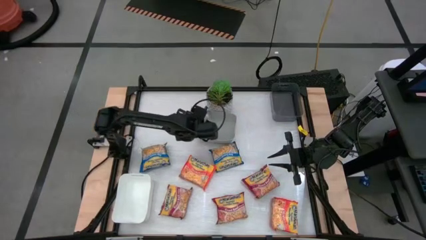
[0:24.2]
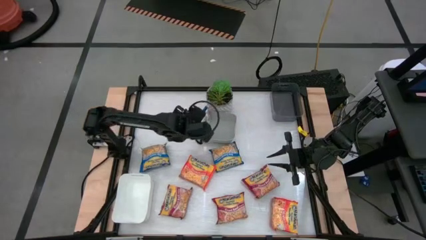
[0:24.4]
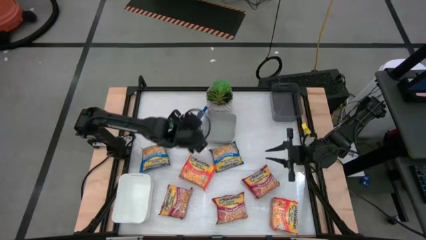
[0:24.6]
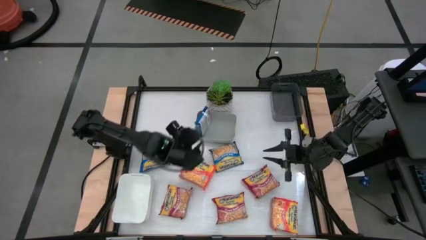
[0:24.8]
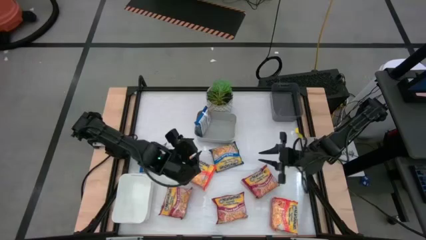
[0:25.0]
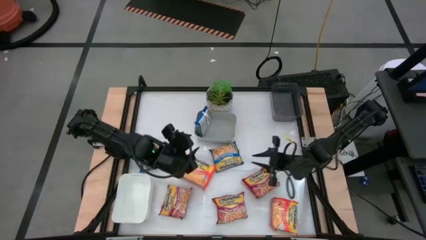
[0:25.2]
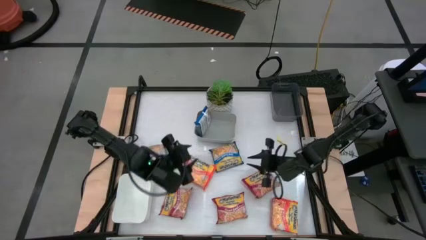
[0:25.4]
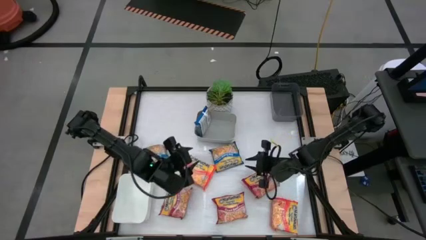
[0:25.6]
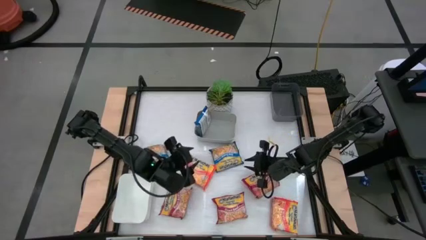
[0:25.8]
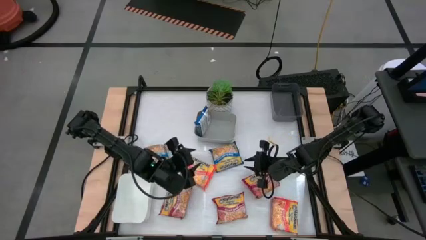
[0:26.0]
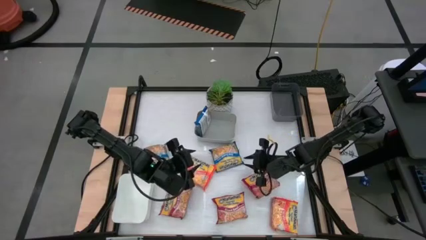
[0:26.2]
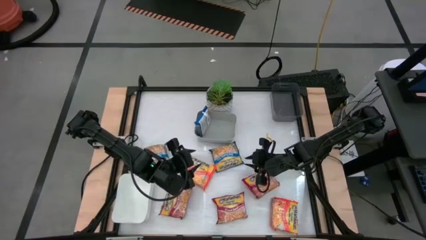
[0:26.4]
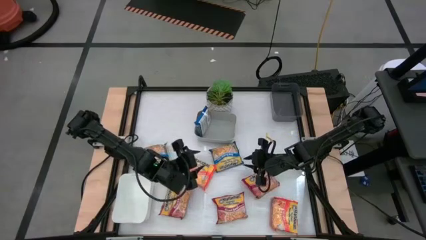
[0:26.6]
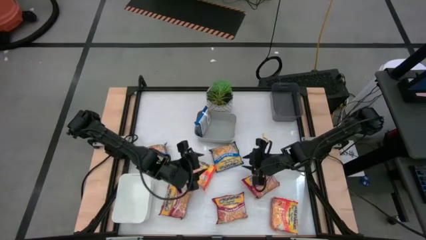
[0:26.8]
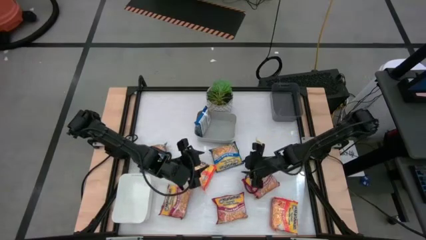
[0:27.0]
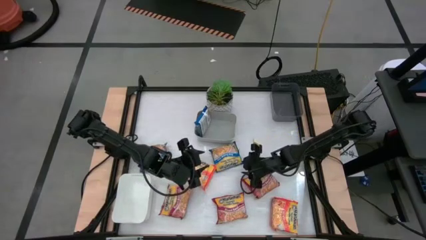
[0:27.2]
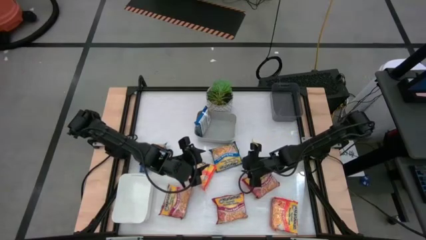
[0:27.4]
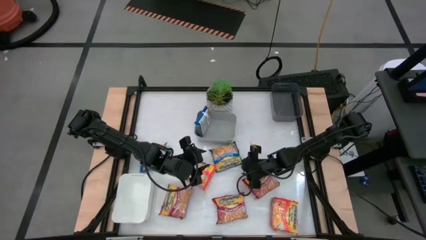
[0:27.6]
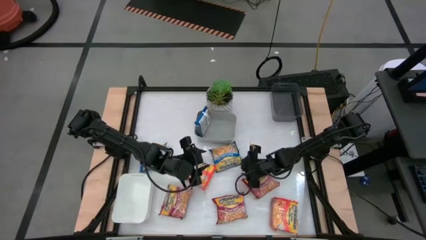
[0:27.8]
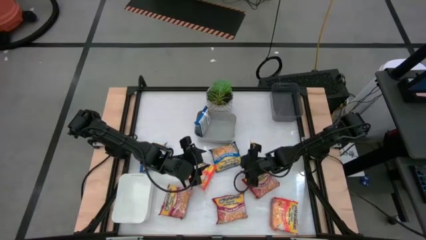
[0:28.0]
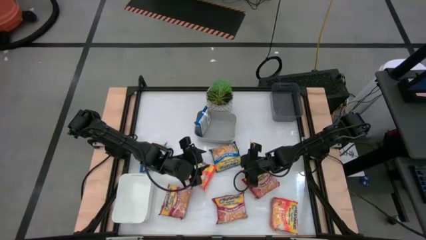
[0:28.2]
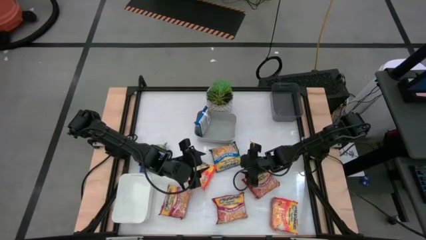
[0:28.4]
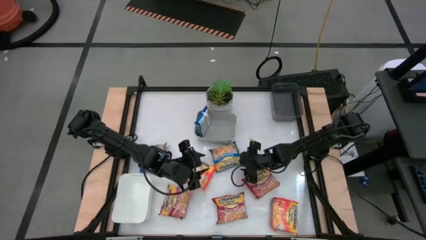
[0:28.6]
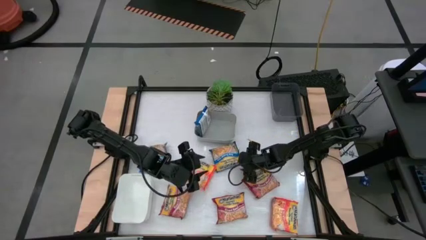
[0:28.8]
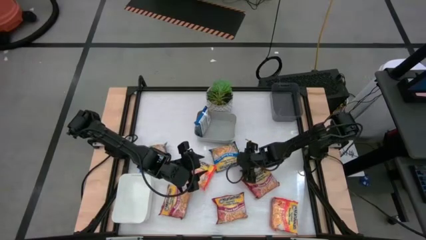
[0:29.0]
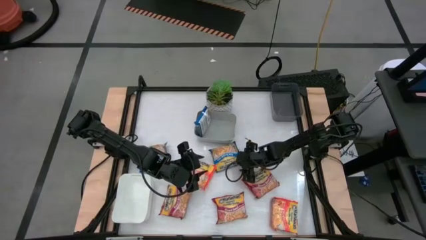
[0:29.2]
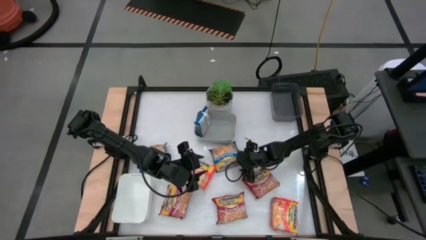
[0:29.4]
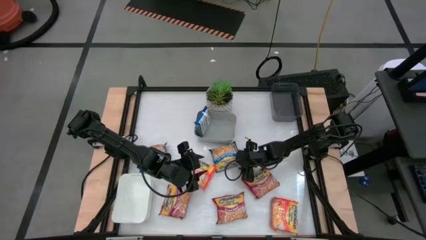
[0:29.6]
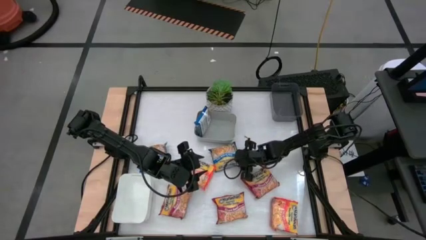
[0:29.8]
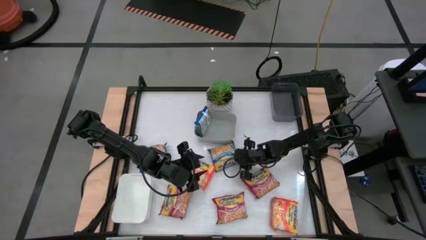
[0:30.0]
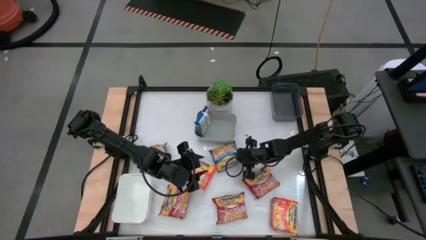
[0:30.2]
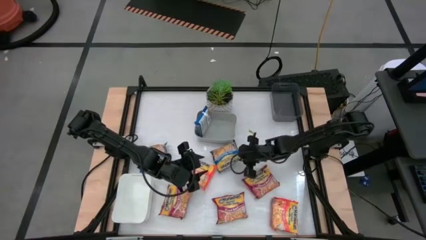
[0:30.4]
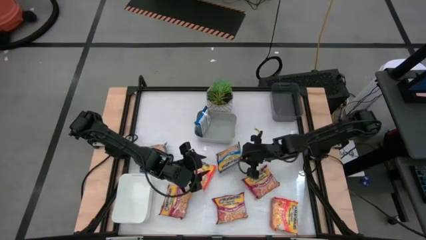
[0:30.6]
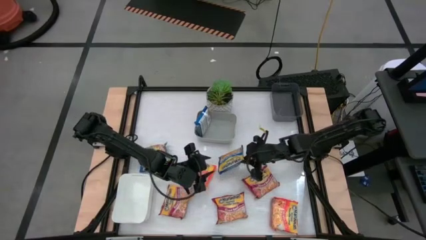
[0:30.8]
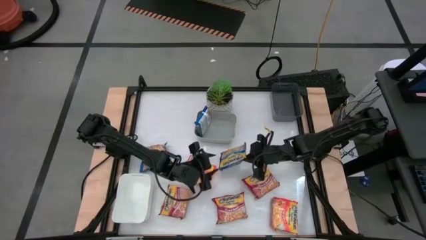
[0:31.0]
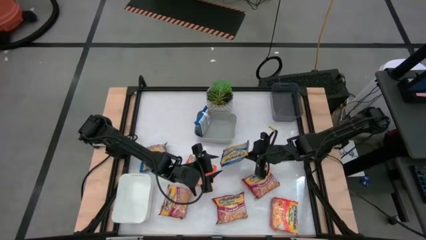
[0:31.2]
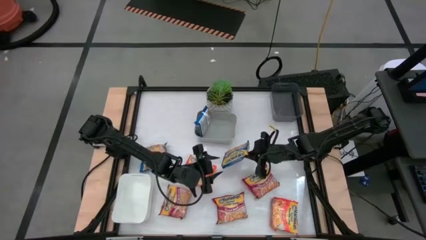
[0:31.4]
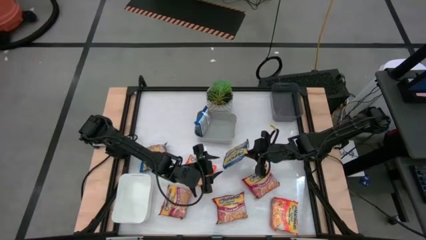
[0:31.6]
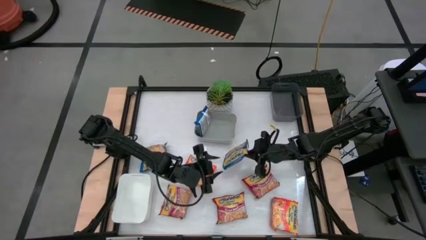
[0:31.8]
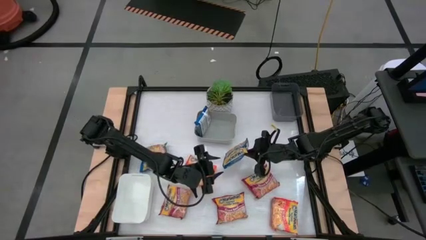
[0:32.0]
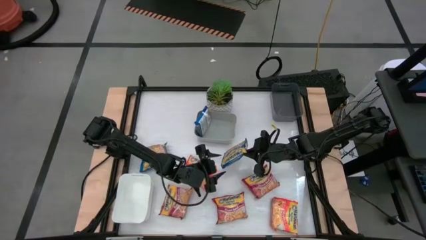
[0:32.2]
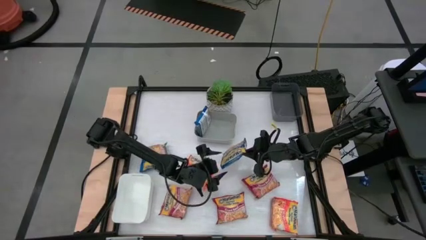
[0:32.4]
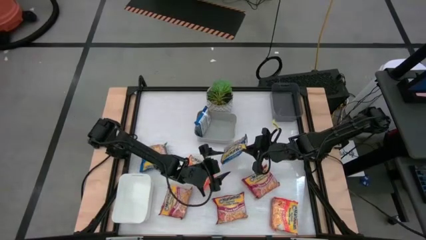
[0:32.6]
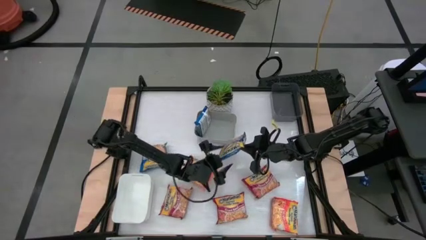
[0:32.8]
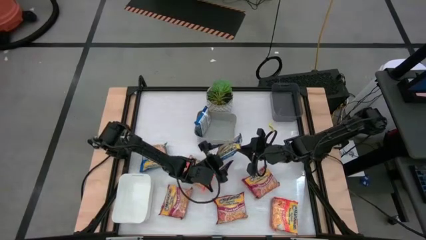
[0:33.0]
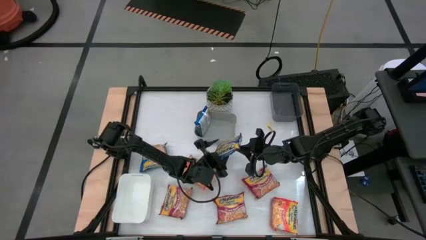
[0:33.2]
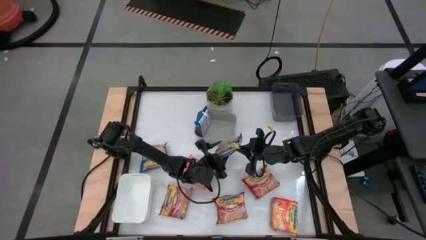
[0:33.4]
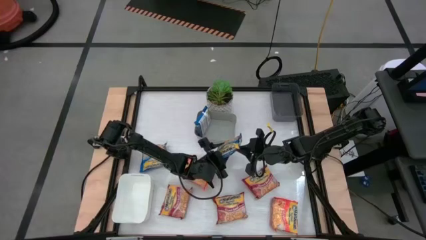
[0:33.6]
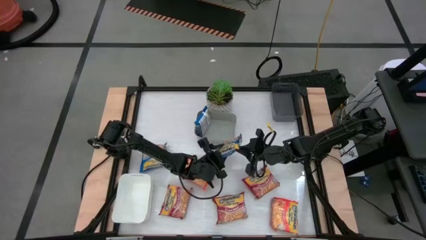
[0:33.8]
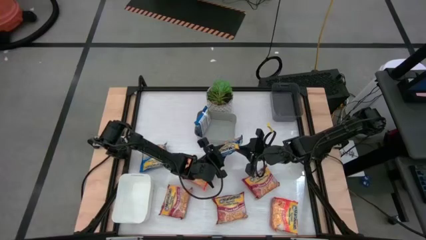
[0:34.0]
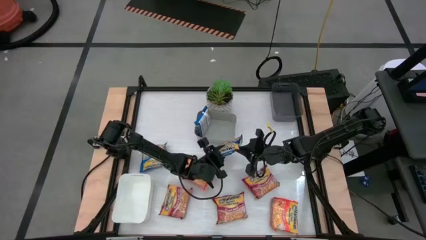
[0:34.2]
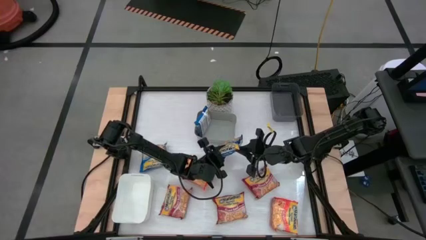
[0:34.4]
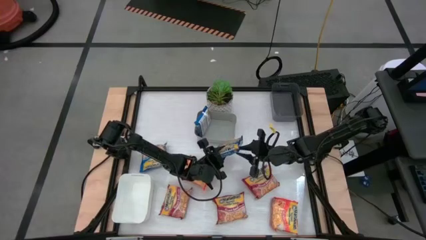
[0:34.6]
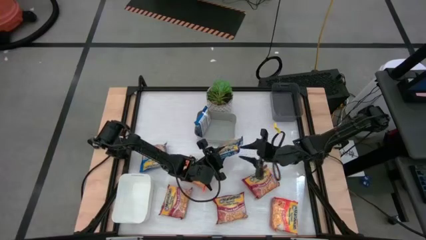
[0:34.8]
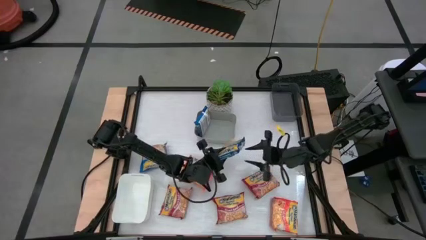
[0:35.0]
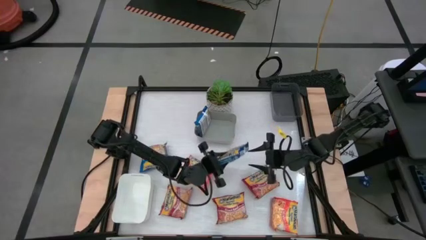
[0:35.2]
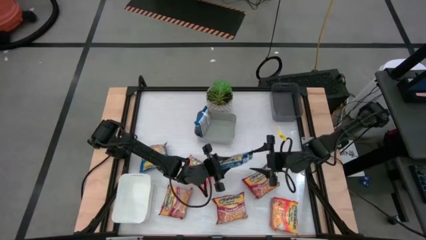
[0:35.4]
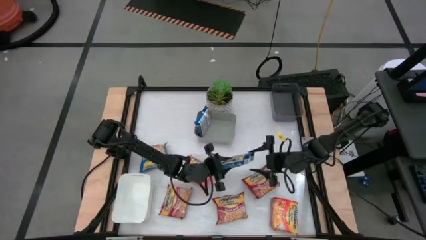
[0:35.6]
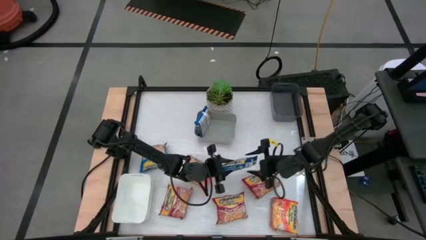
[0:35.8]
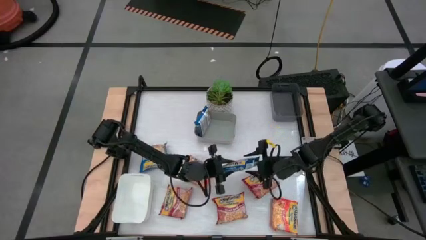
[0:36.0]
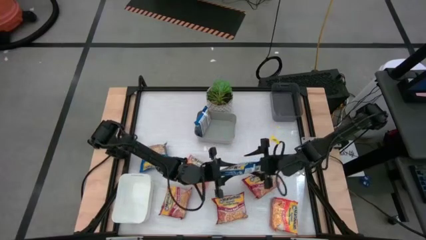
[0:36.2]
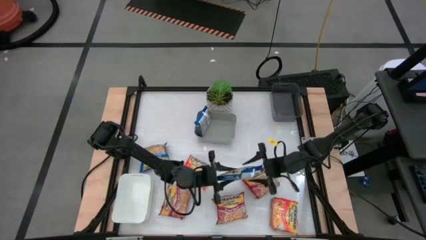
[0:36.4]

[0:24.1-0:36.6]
Task: Sort Maruchan noodles
Put the right blue noodle pack into the gray bin
